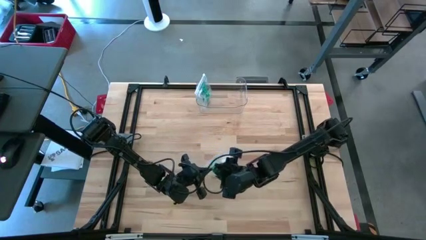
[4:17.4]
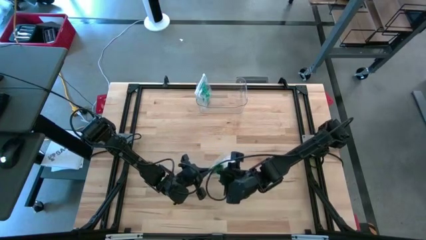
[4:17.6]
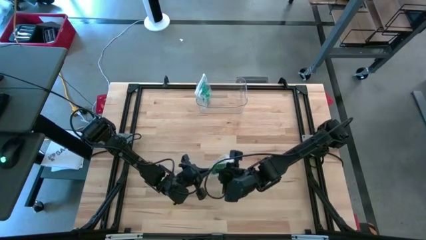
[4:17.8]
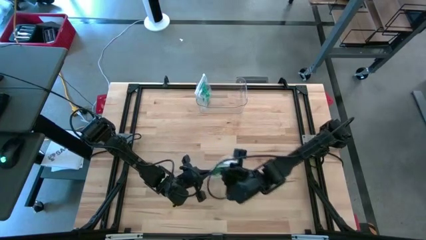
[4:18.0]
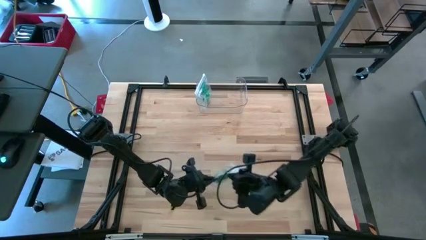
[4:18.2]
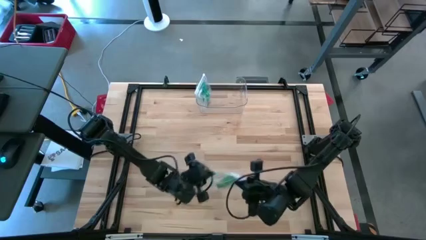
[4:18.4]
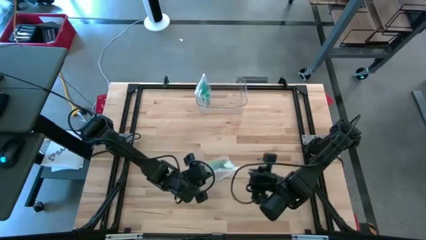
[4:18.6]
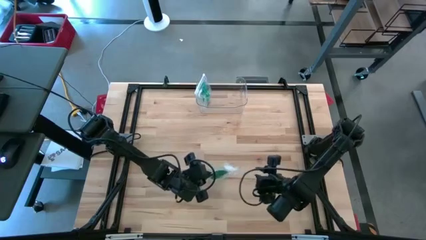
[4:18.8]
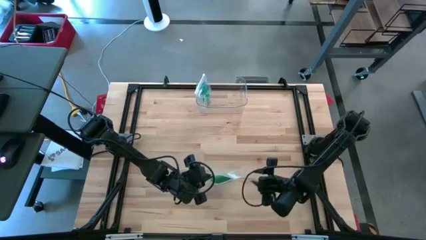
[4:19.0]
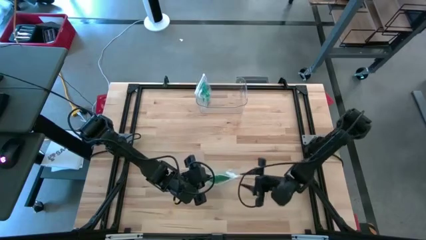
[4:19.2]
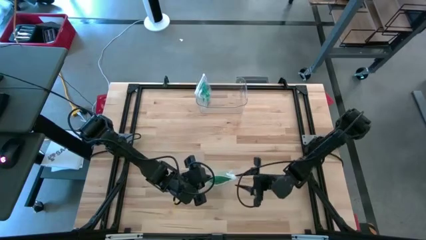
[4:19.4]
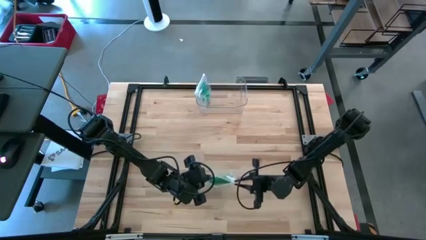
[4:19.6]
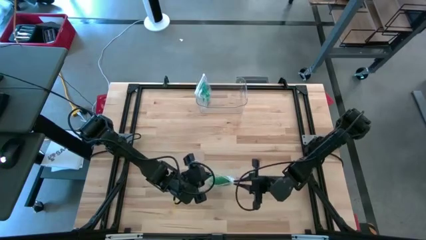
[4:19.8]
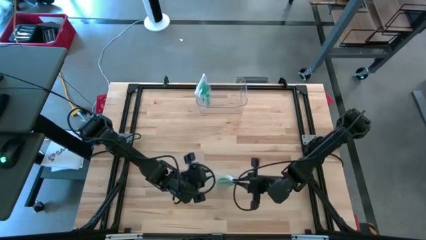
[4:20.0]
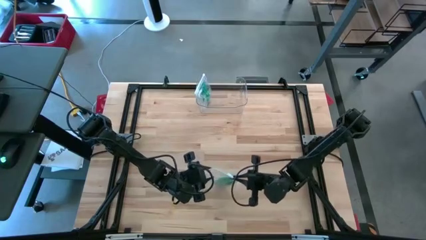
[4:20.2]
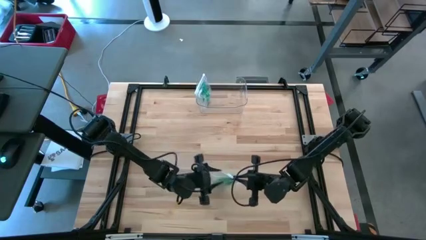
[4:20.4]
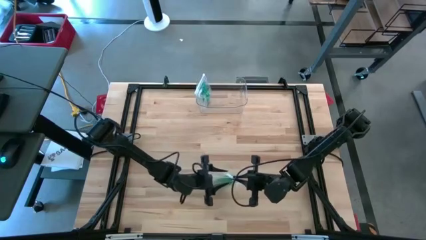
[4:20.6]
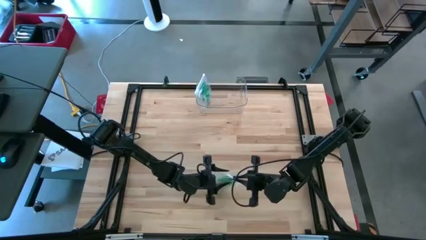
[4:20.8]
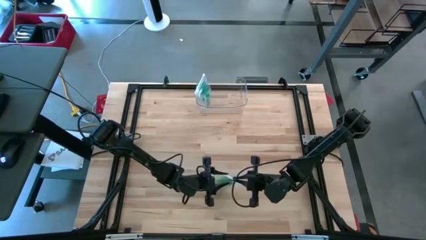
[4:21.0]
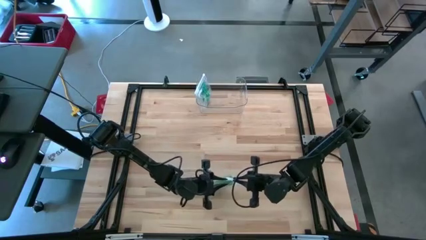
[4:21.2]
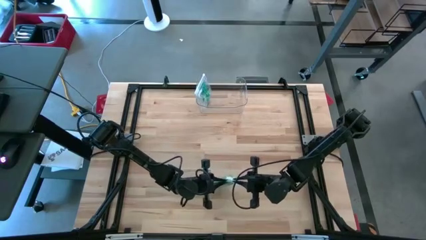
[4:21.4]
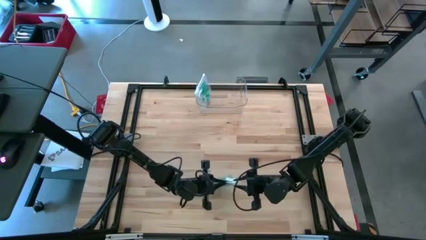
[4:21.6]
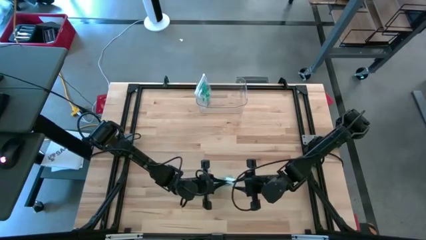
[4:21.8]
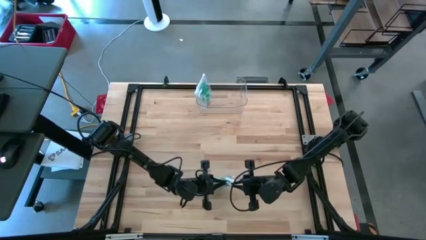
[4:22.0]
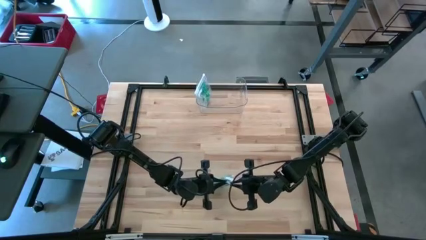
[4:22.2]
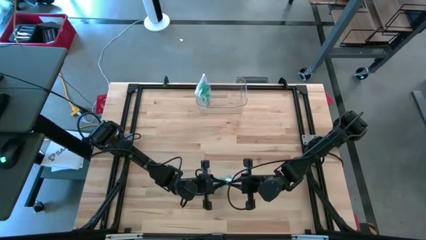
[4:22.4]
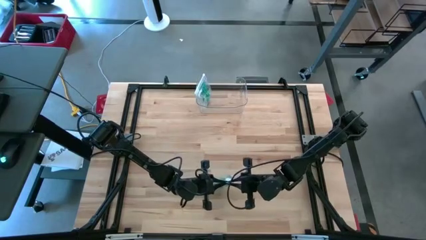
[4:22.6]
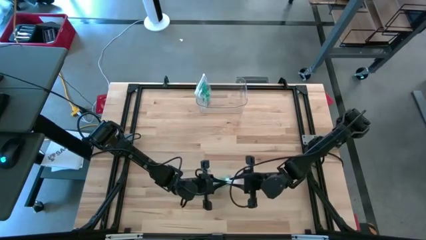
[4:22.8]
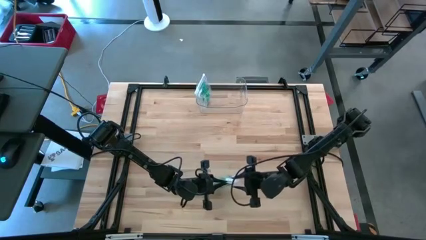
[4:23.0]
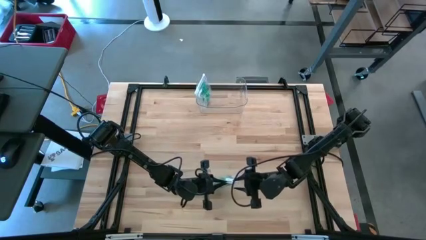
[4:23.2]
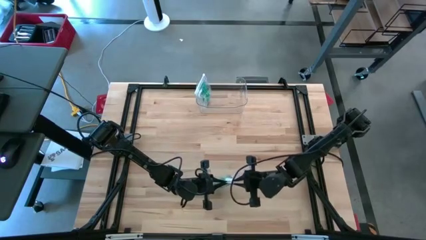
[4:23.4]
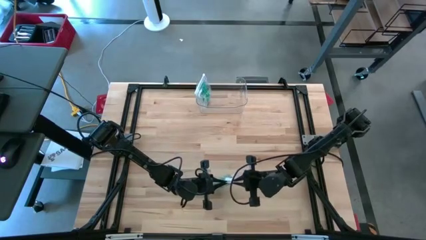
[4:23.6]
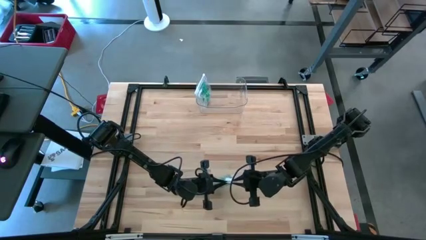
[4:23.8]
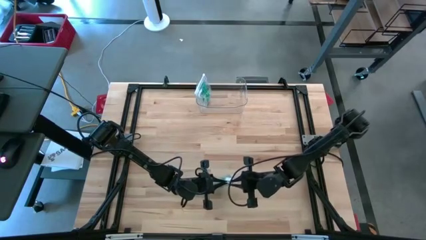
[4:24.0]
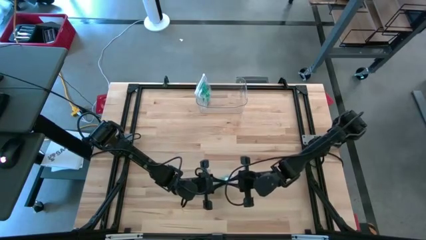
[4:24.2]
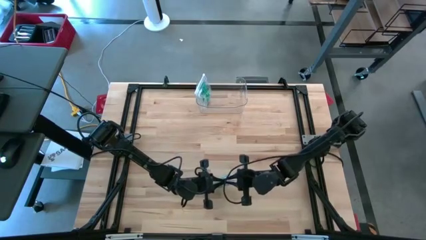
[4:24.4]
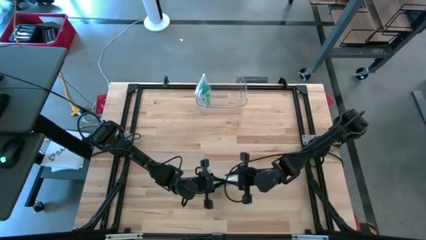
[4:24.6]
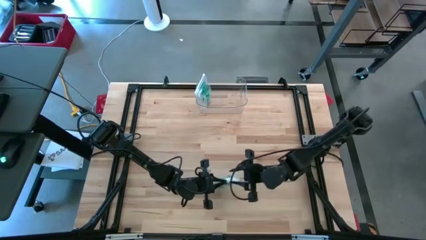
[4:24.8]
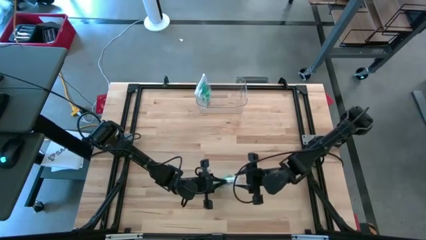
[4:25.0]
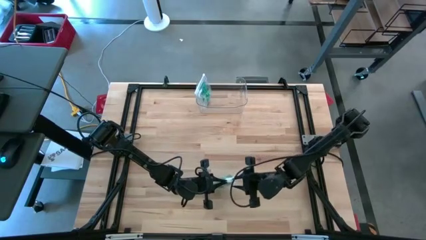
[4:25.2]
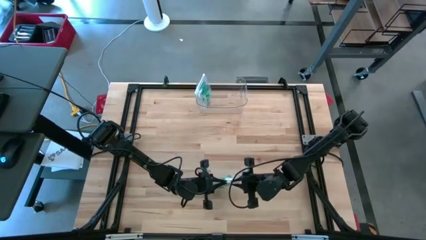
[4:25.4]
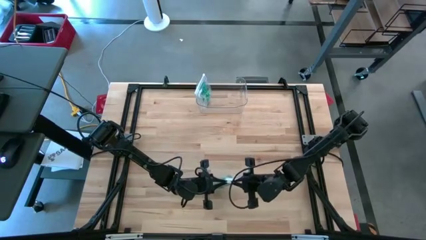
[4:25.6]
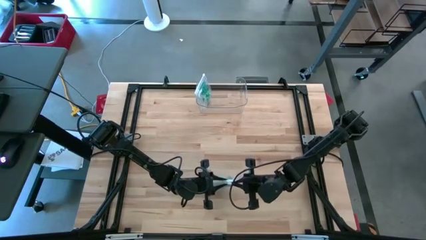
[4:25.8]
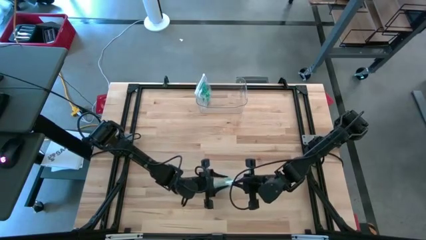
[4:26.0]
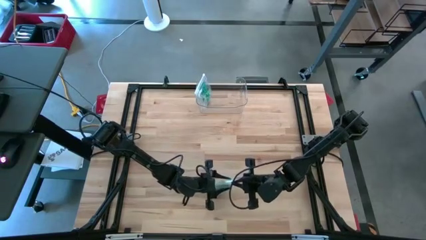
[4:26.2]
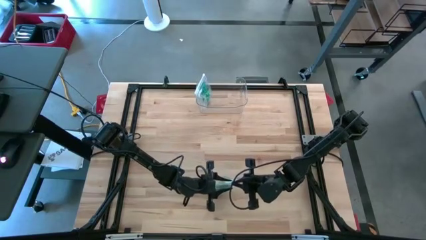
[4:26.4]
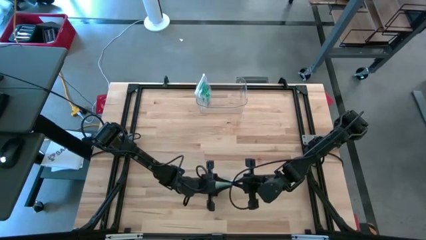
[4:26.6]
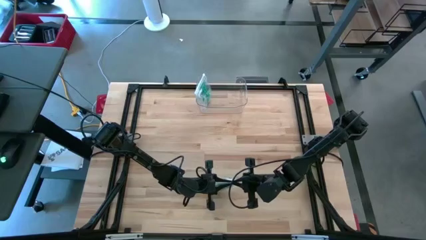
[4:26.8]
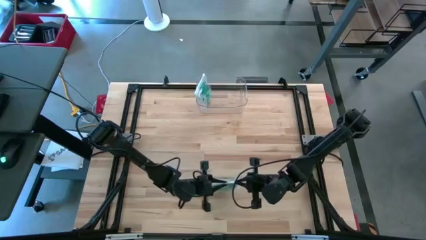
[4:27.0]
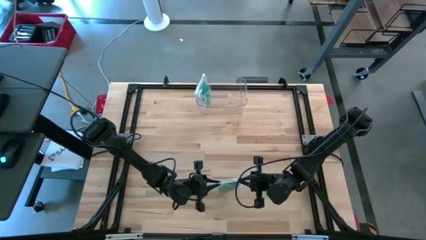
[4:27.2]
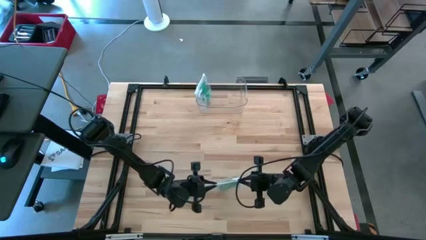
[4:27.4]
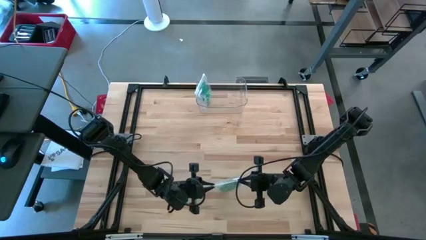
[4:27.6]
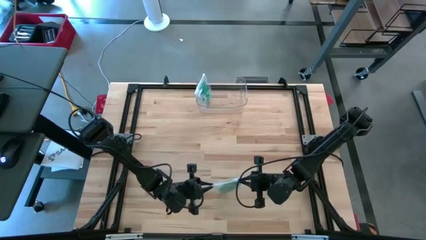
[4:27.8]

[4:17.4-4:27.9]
Task: Roll bandage
Close up the transparent zip bag

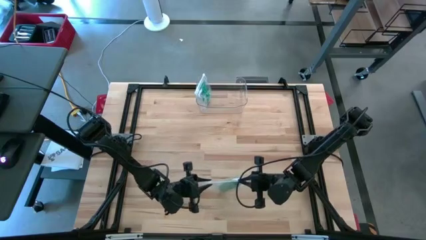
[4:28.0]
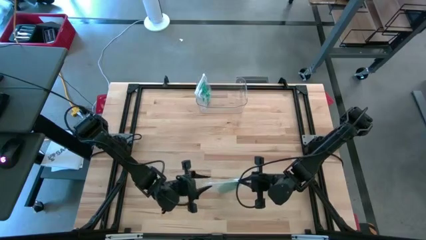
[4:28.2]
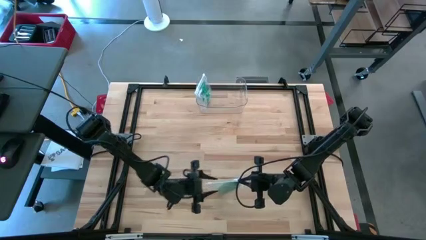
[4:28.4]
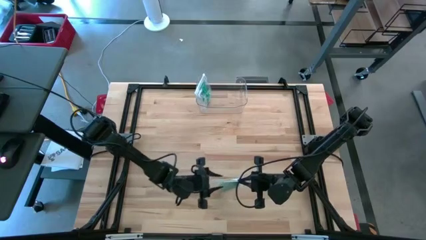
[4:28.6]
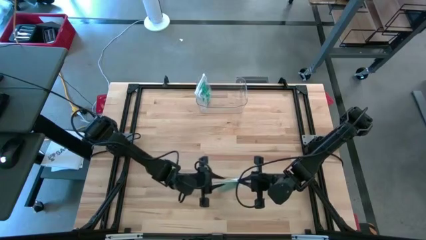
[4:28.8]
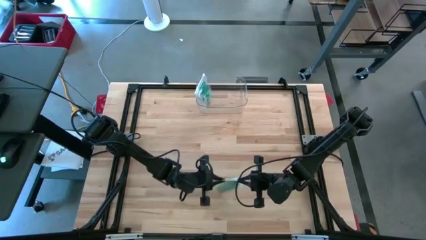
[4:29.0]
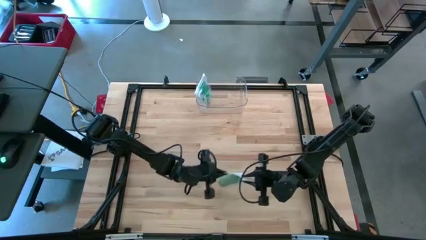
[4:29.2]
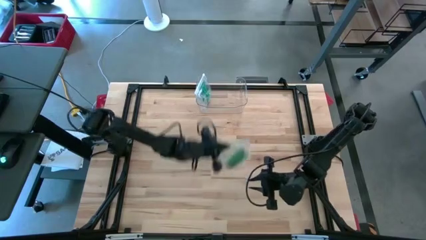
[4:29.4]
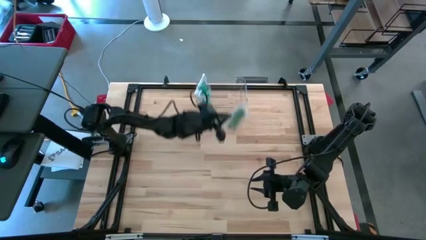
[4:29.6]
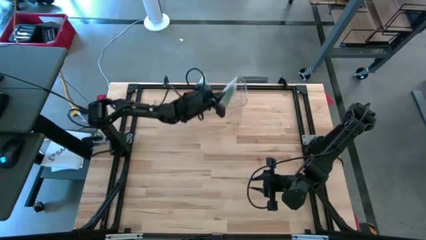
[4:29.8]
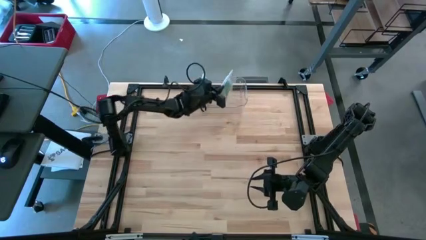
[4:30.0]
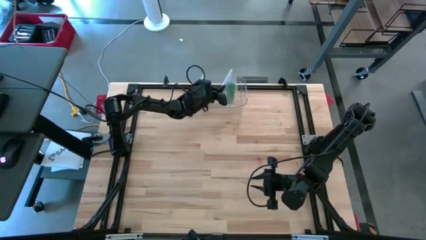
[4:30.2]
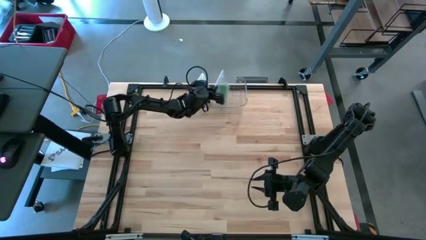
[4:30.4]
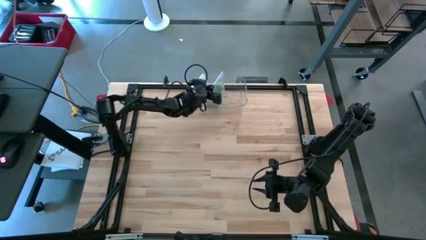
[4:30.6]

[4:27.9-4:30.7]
Put the transparent zip bag with green bandage into transparent bin
